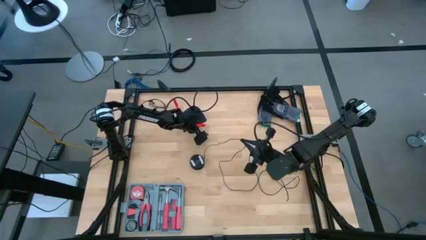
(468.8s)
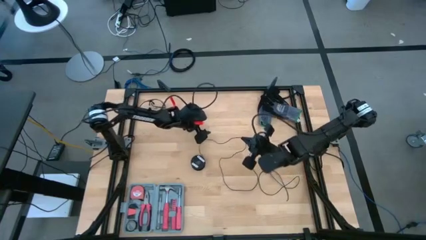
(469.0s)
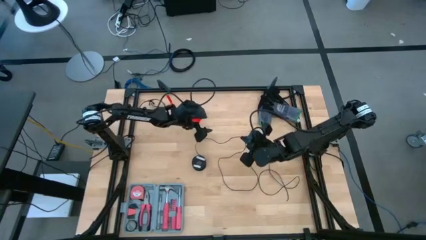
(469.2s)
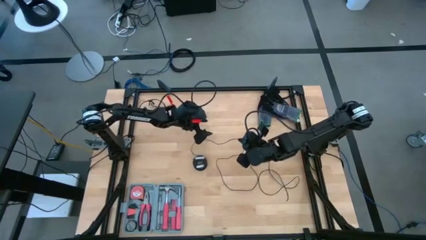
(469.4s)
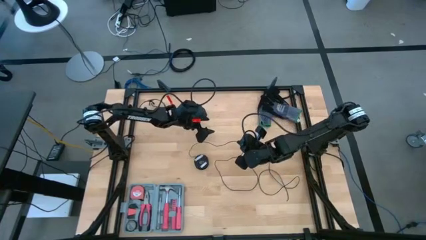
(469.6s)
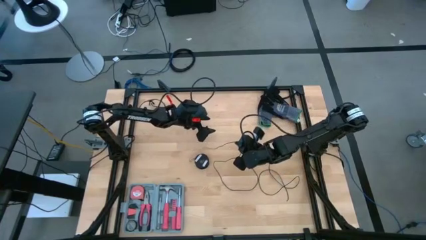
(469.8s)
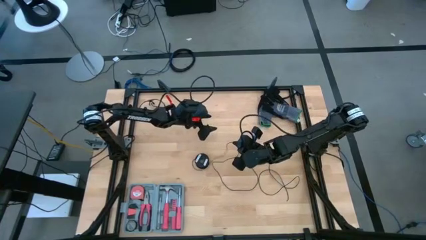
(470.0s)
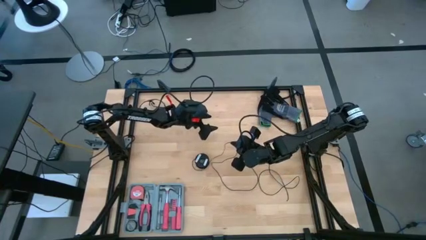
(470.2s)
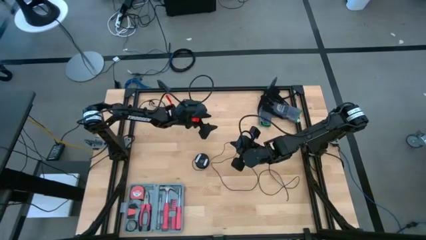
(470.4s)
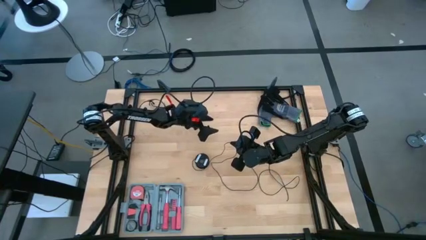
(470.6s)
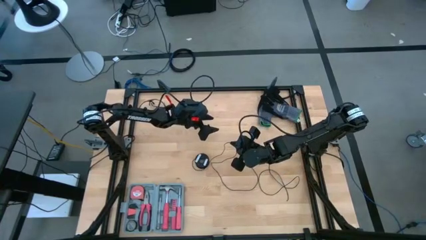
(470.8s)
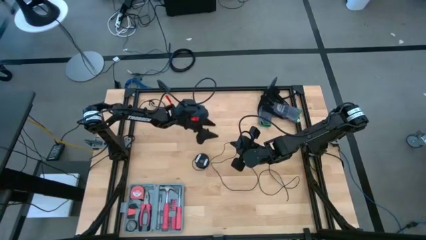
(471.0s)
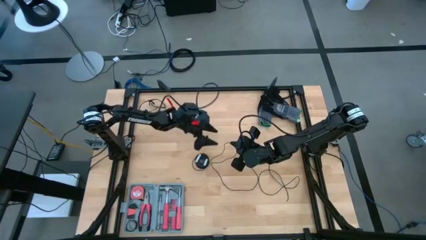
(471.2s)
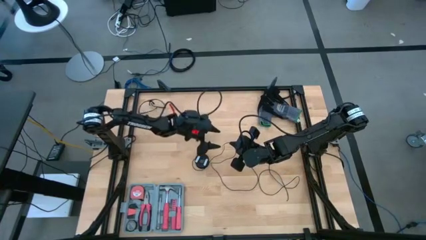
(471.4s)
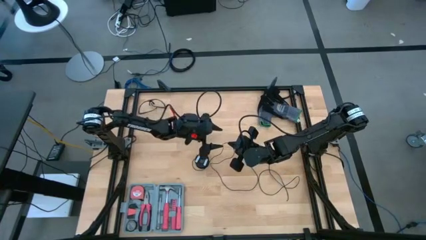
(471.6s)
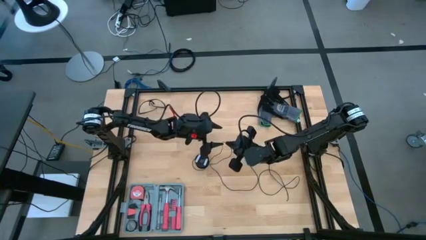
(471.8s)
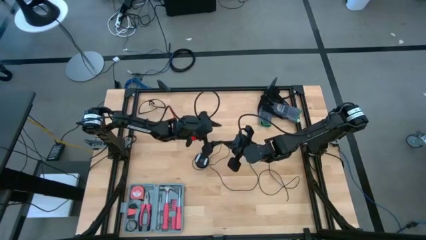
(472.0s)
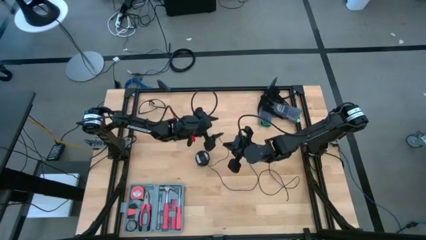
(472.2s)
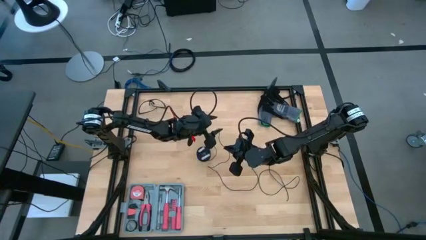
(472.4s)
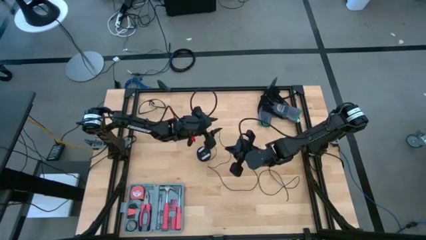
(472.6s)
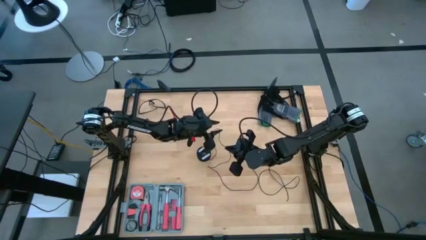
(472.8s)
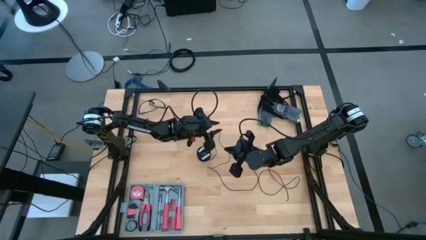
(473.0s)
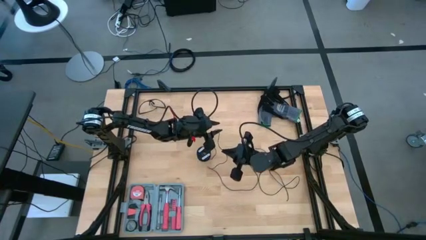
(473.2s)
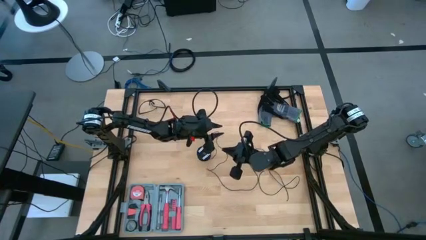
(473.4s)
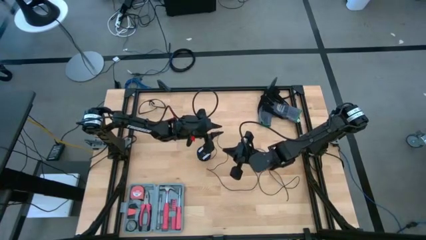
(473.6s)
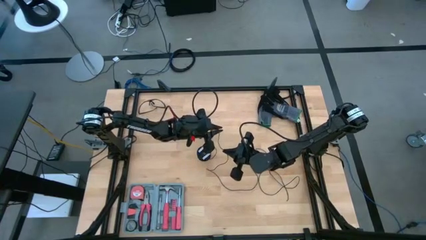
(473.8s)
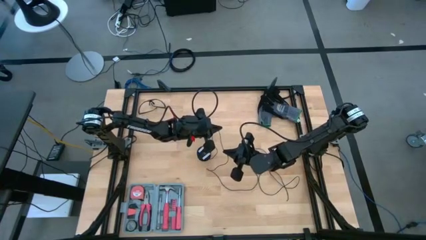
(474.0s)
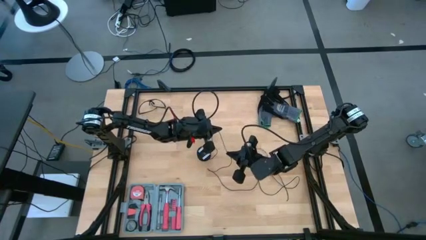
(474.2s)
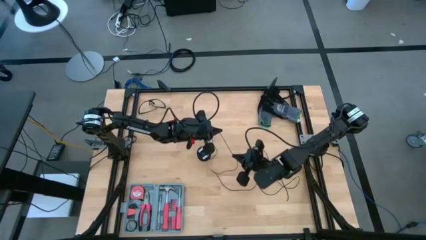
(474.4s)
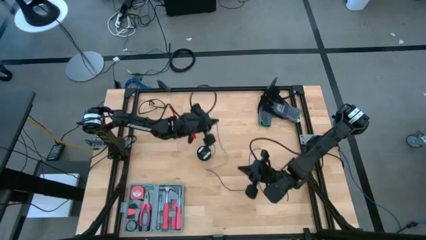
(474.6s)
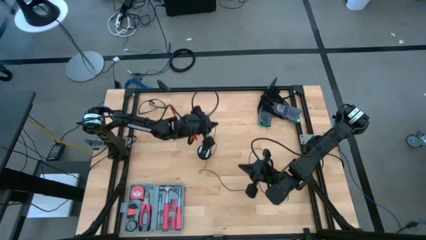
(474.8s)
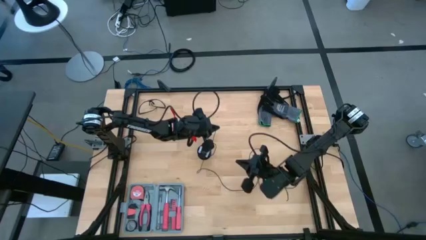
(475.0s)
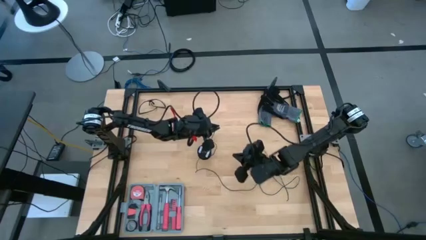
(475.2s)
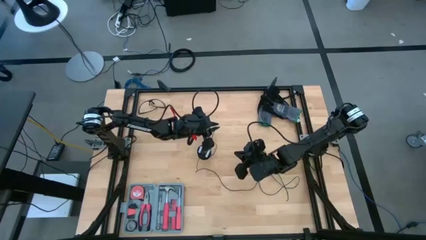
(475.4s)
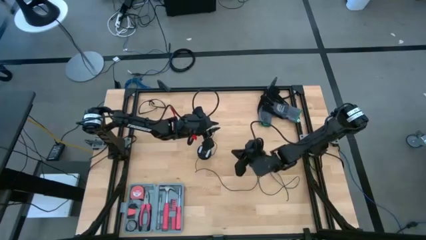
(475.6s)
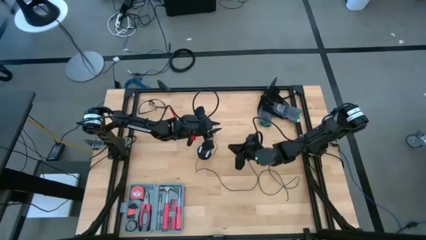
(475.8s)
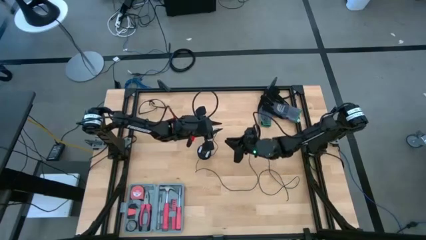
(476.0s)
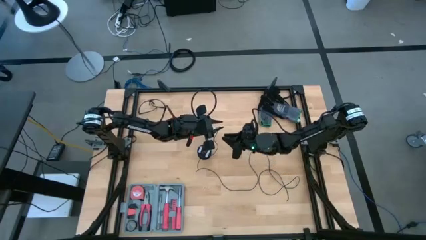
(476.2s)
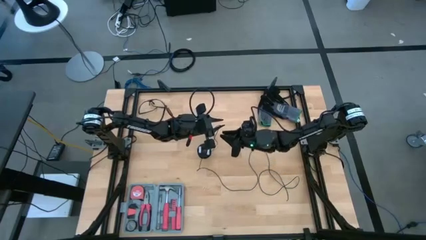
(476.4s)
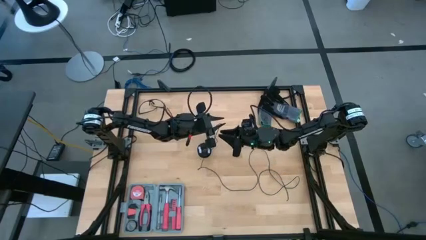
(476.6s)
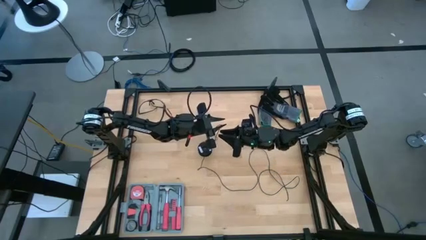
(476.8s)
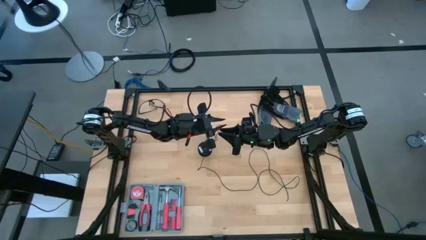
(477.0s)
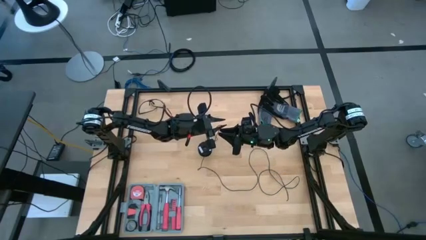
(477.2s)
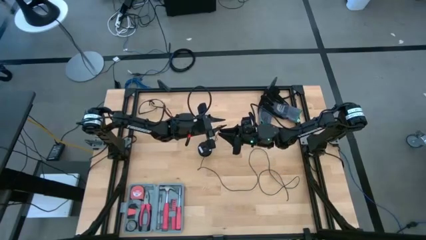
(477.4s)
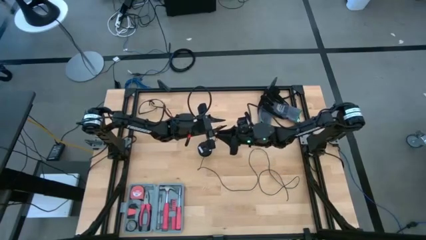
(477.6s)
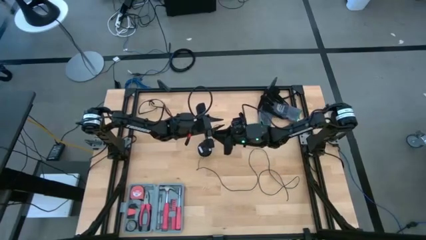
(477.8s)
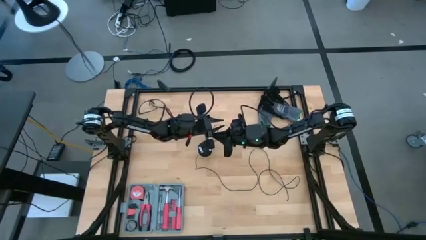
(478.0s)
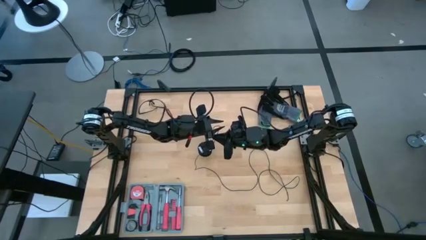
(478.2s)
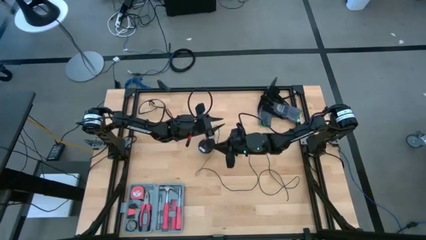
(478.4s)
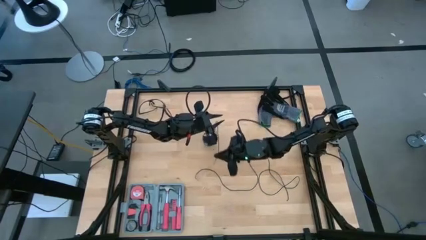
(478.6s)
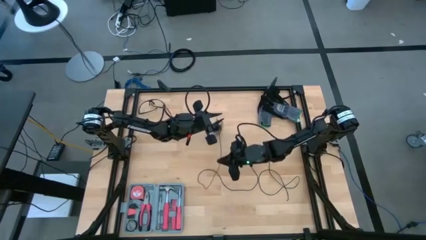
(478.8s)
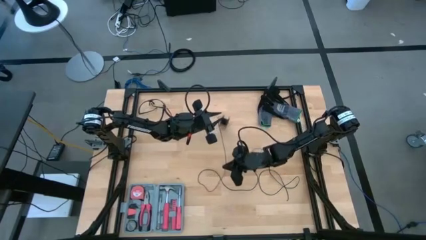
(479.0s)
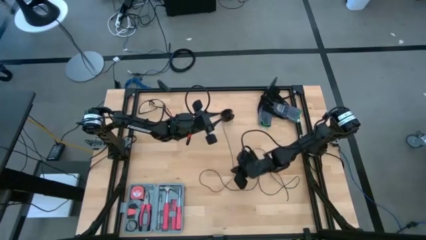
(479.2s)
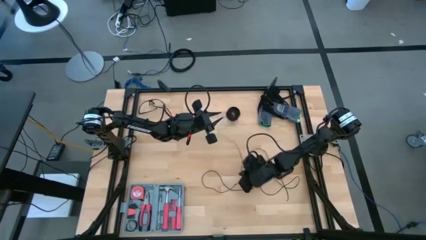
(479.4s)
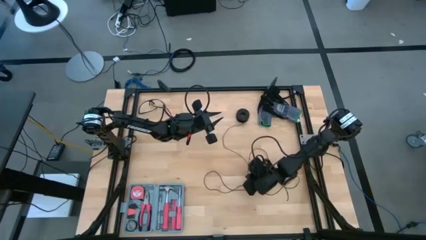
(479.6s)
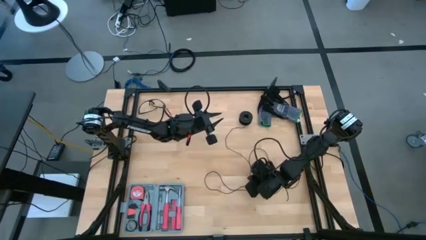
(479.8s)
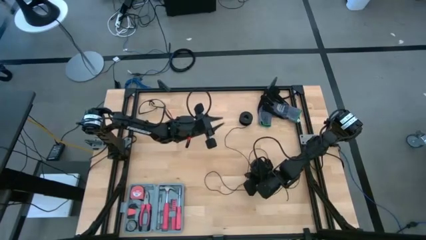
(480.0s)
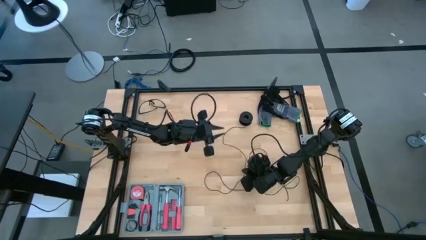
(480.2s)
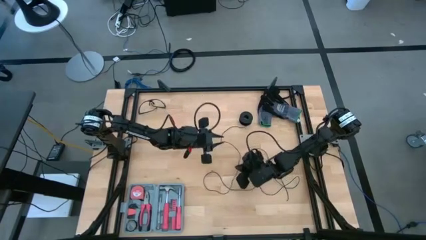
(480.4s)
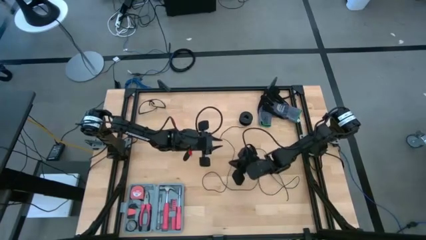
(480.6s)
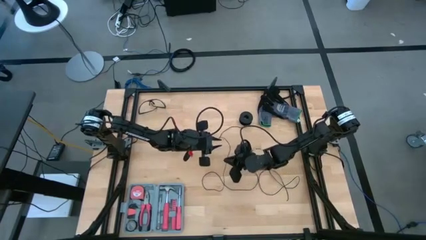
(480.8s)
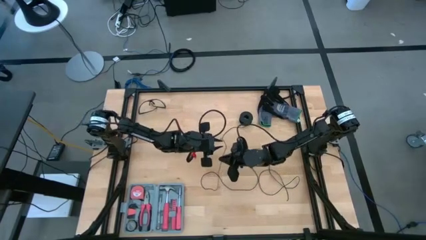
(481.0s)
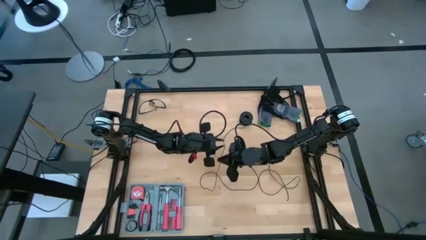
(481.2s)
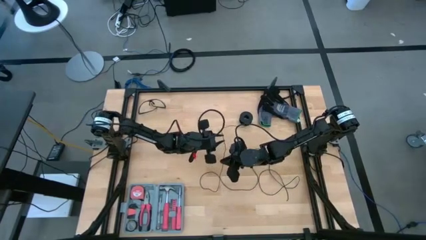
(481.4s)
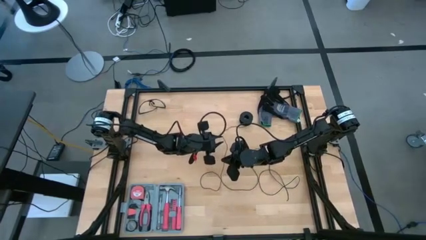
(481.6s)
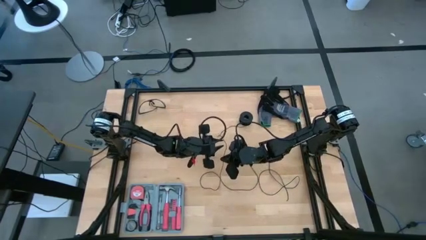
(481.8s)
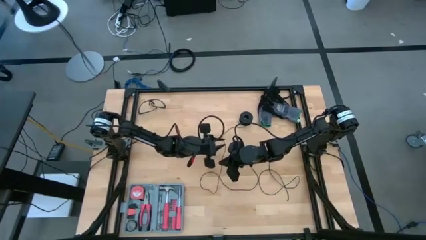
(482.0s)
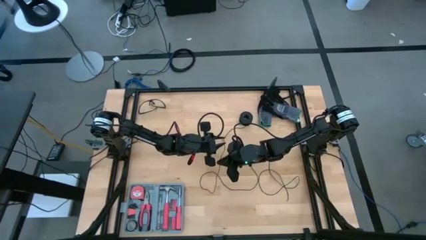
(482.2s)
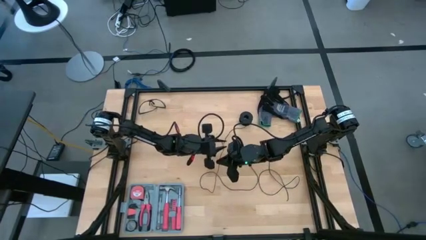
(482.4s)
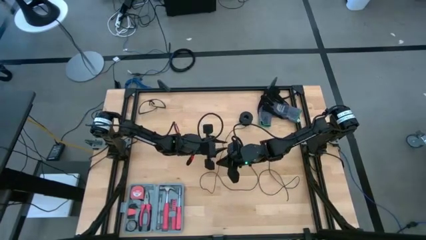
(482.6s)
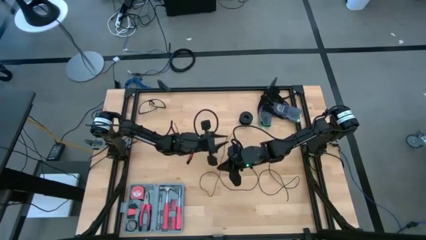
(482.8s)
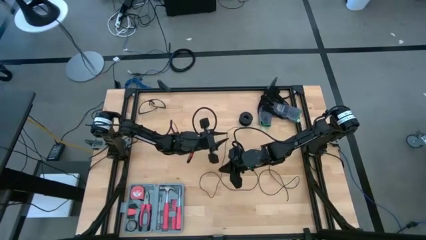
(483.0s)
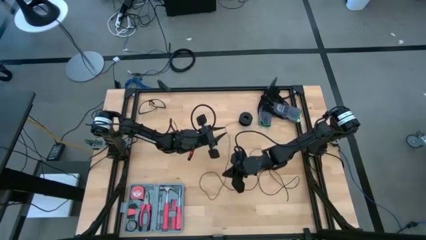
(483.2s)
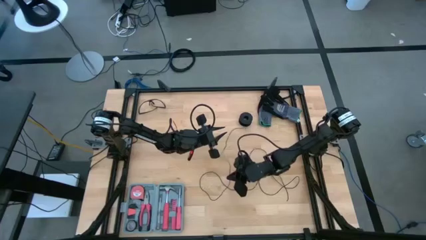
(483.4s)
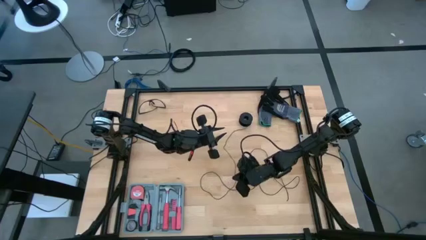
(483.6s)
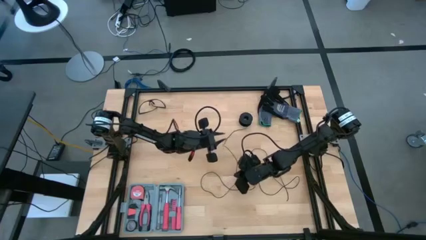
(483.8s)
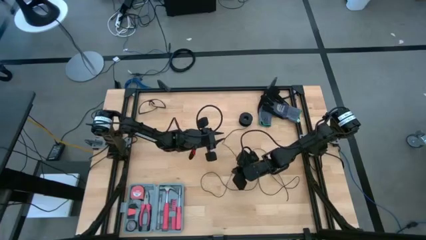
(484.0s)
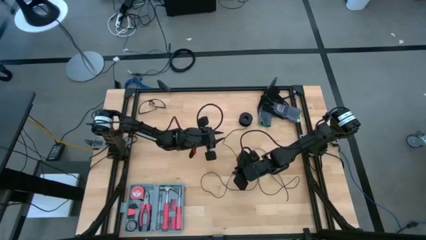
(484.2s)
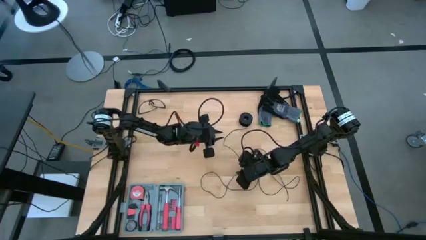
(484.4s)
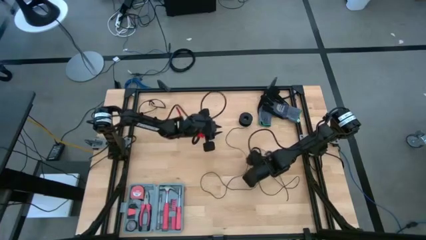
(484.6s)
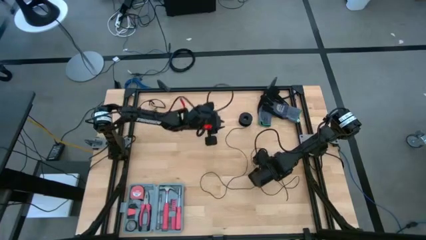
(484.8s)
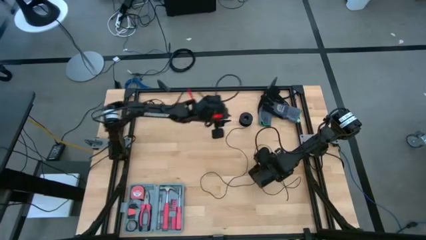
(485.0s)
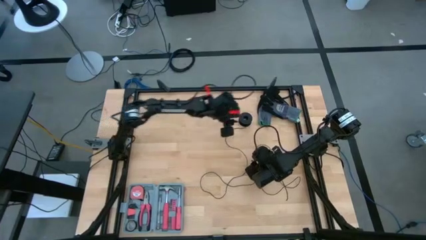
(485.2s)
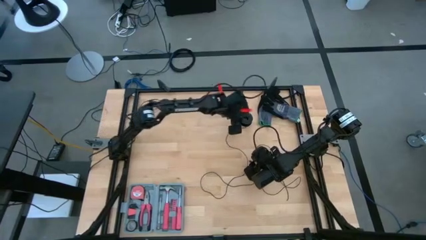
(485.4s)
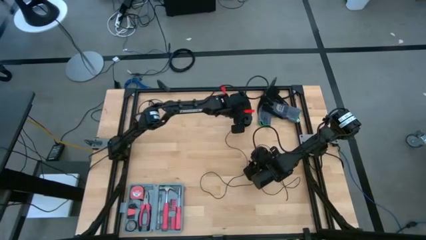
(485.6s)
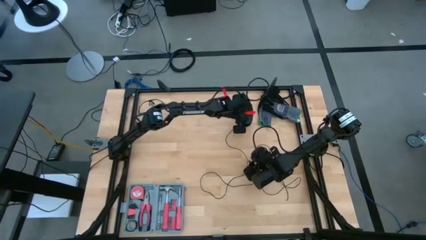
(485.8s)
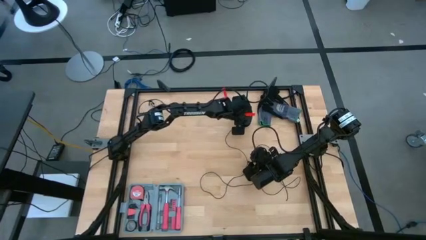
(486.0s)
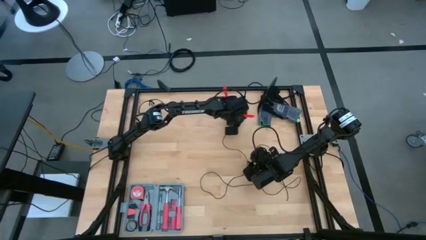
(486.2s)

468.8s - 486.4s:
Task: Coil cords
Uncoil the black wire from the black spool
